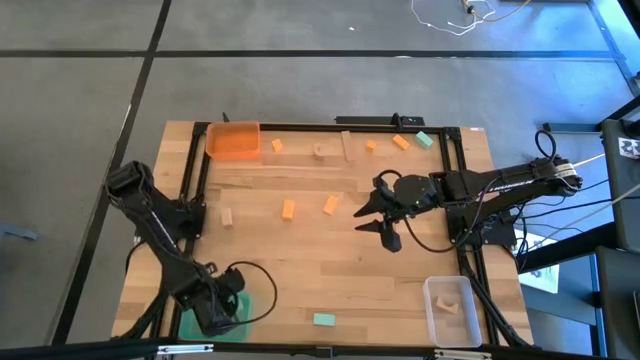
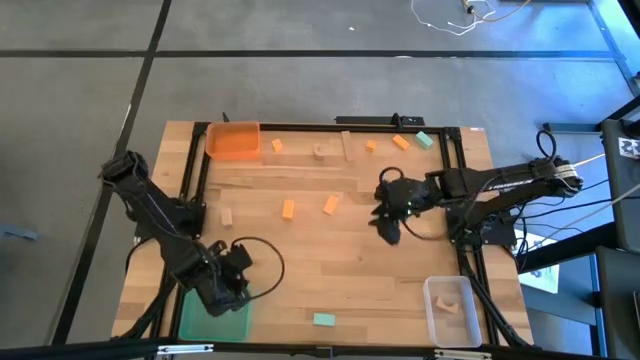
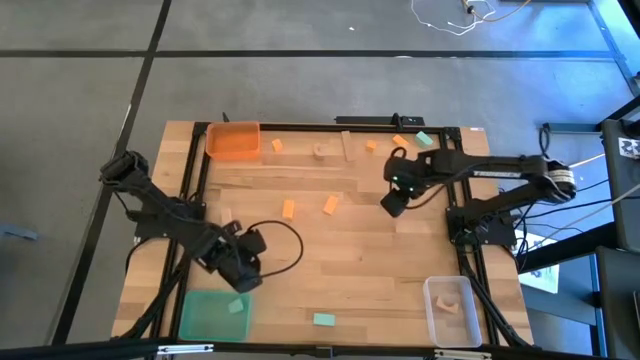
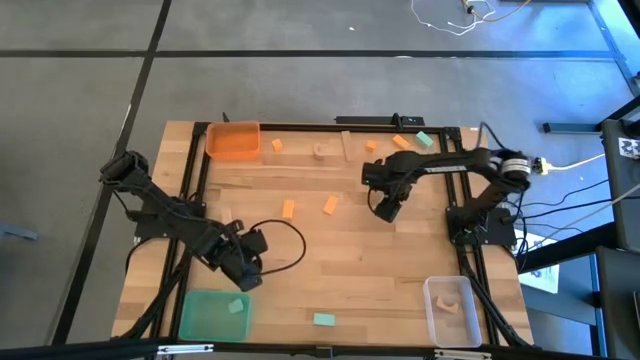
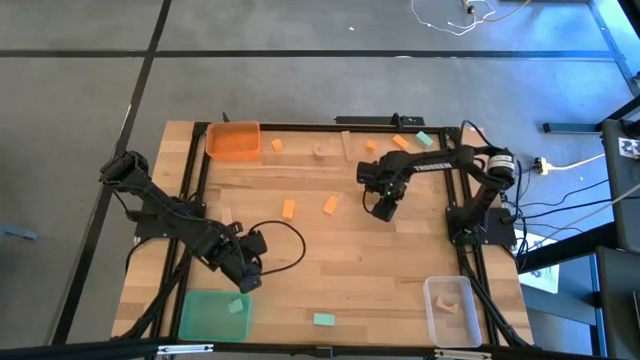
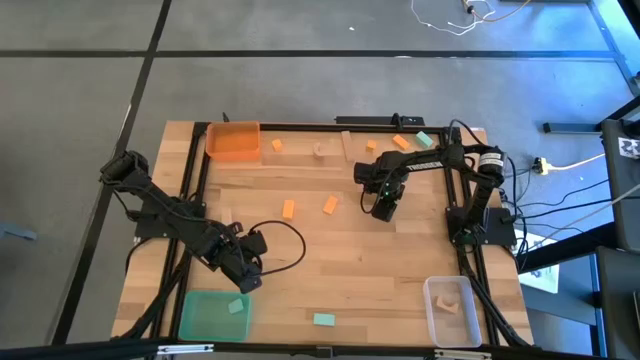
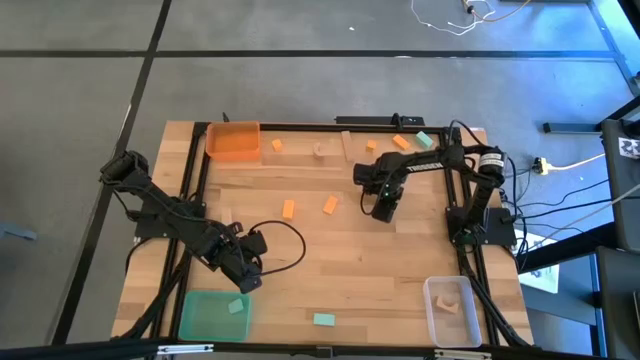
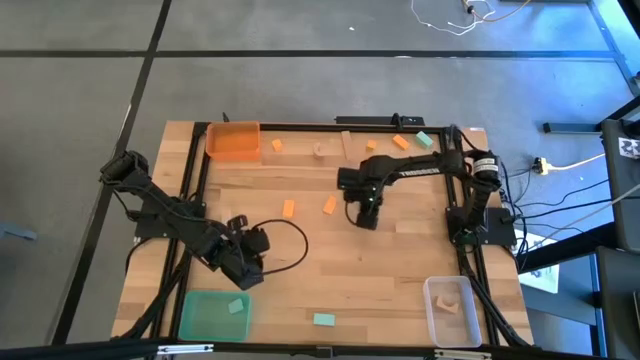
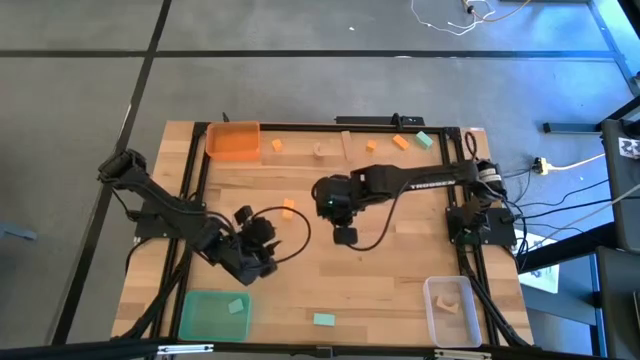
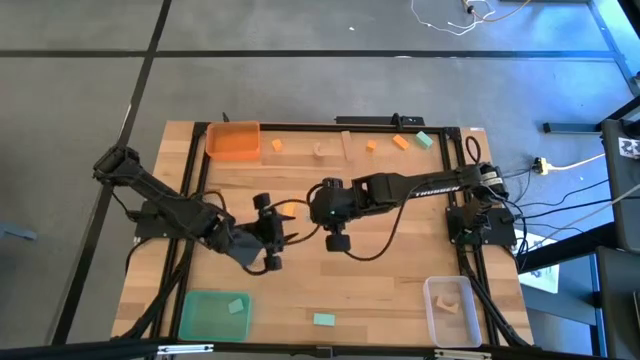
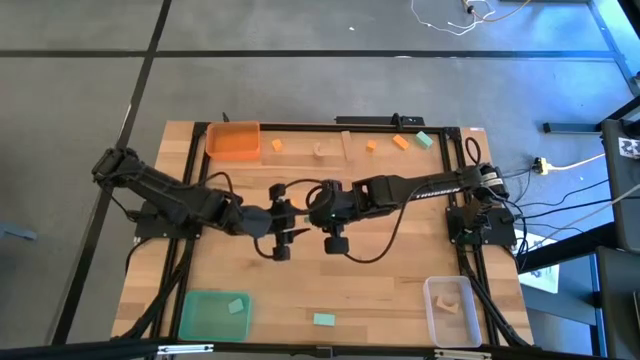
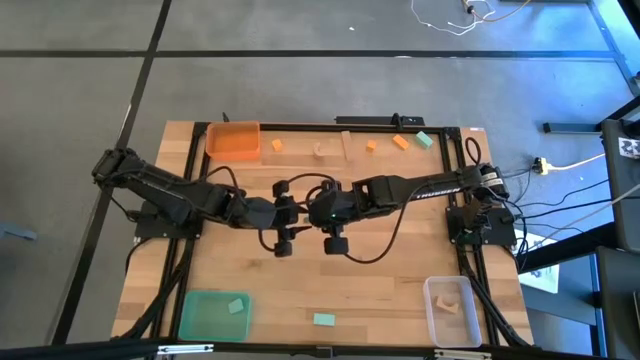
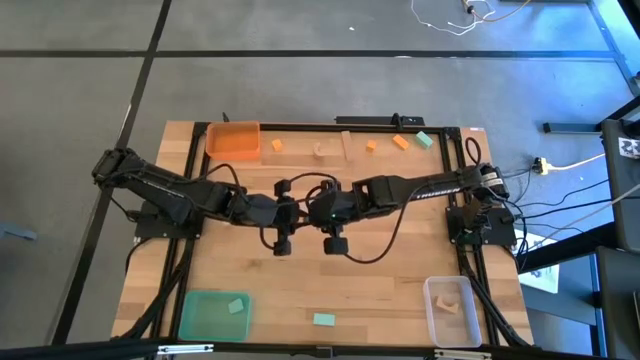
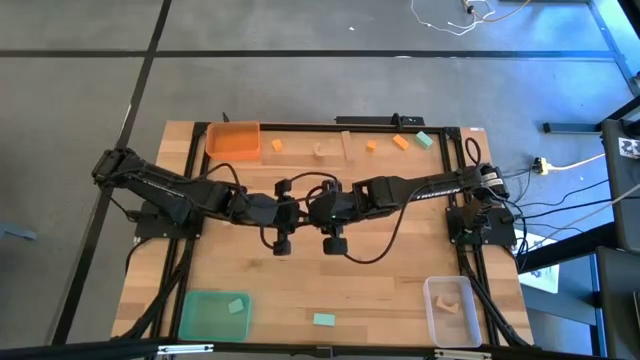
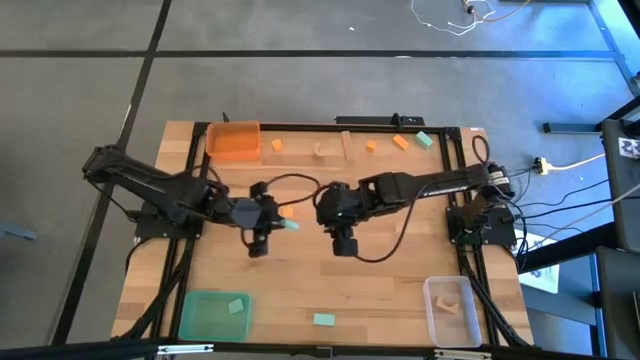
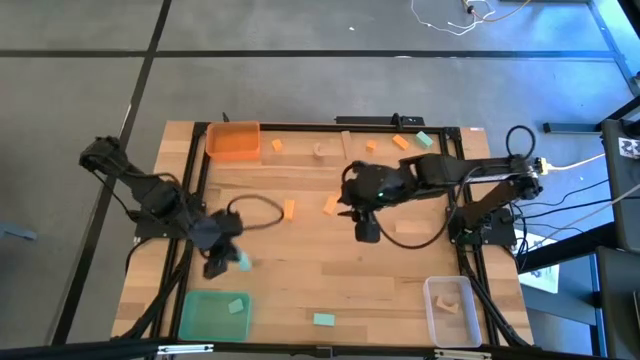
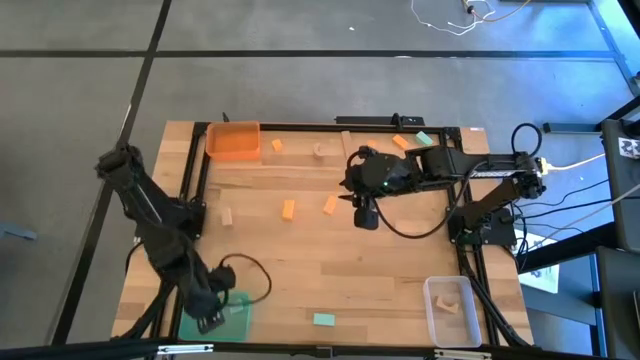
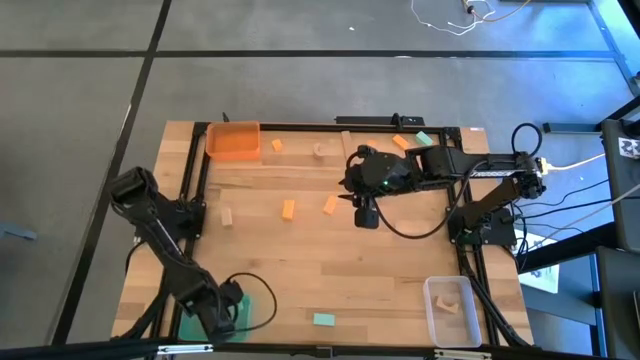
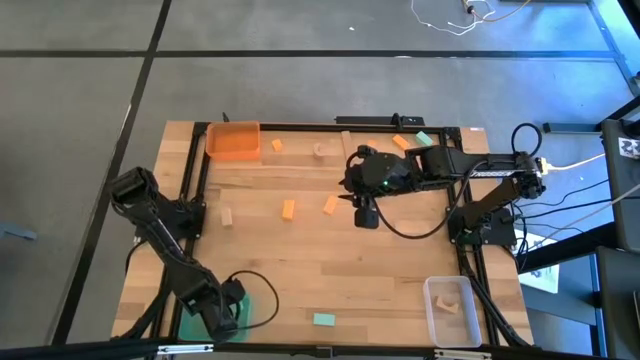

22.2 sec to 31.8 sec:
Task: Sort & place blocks by color
Put the blue block into the blue bin

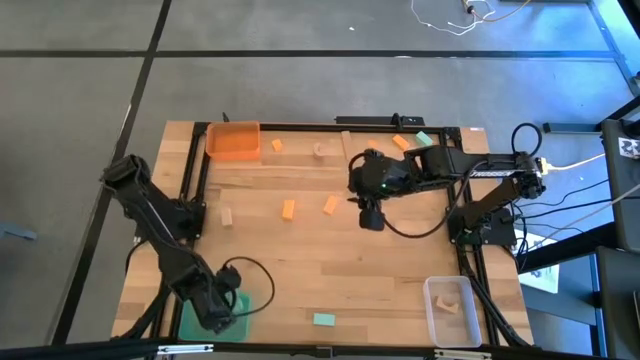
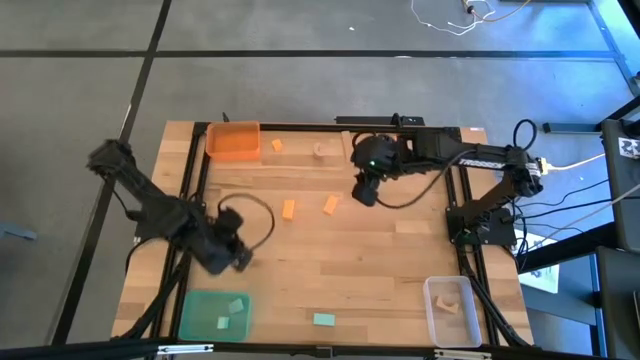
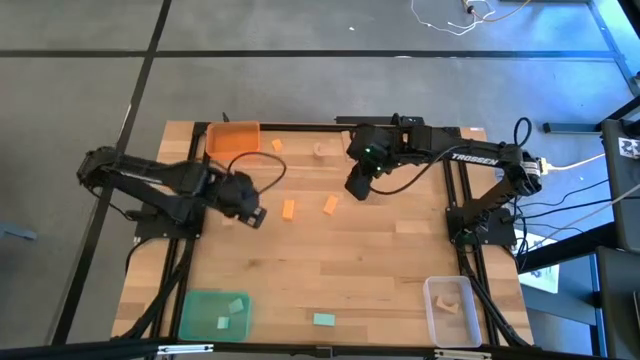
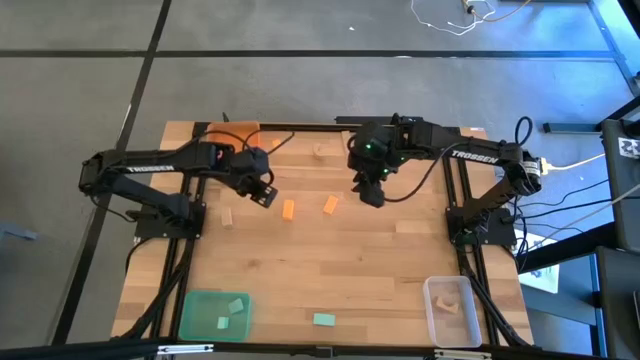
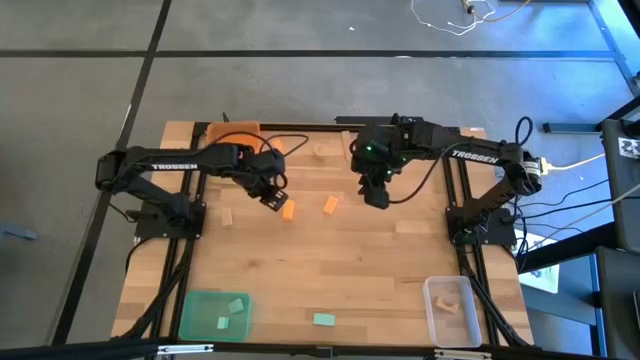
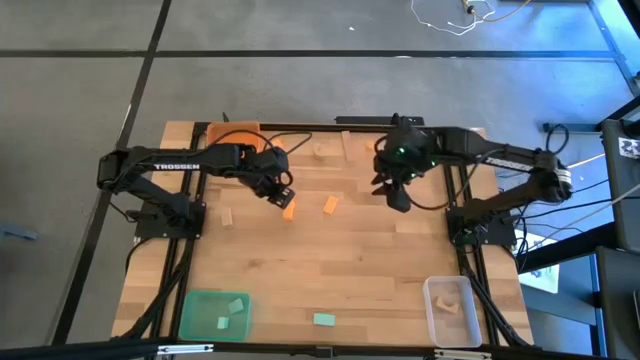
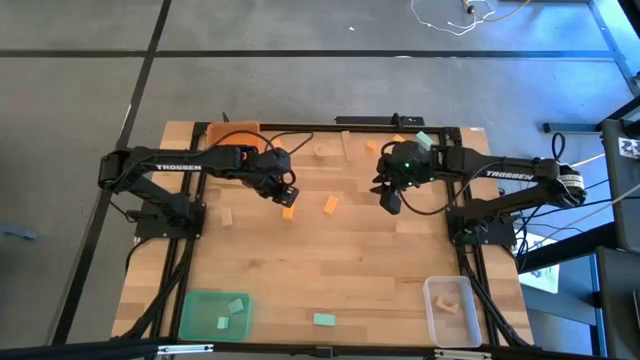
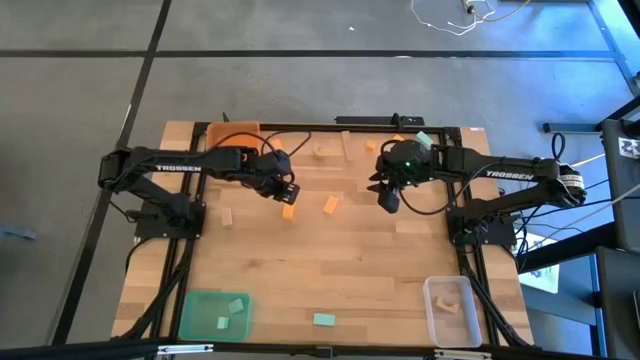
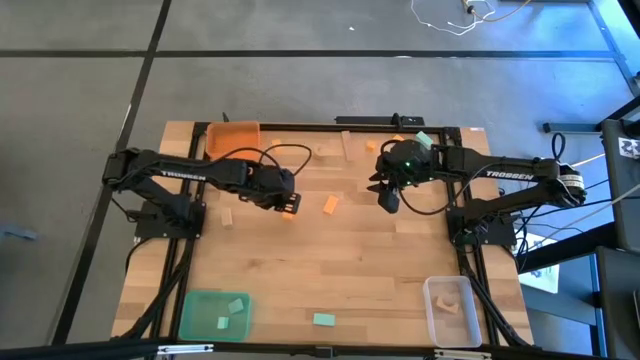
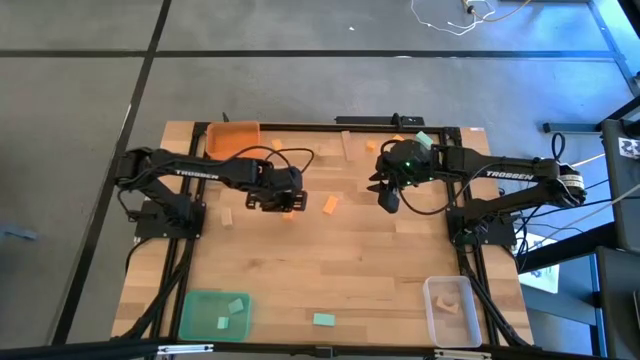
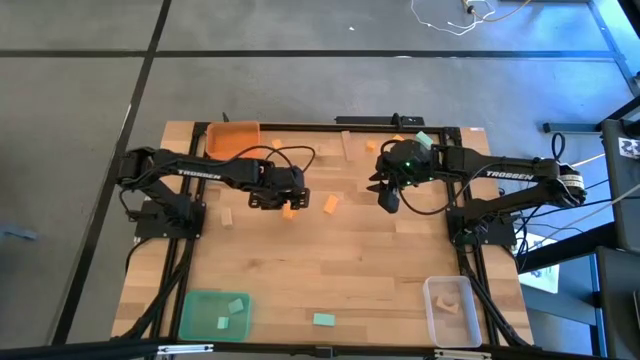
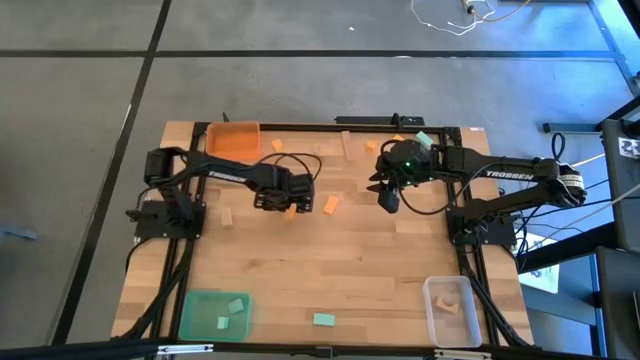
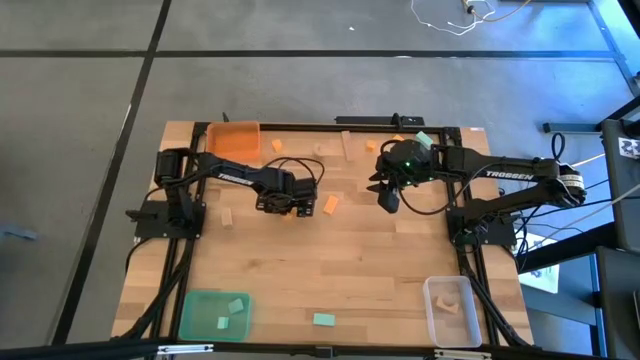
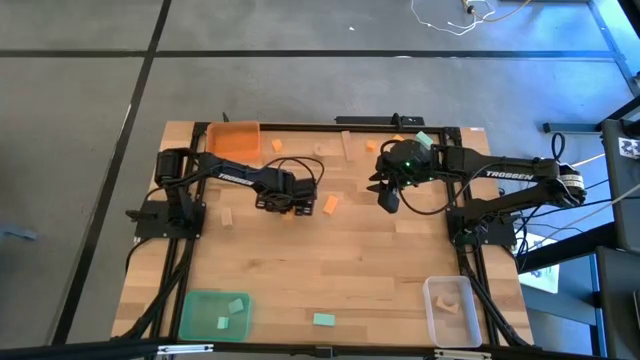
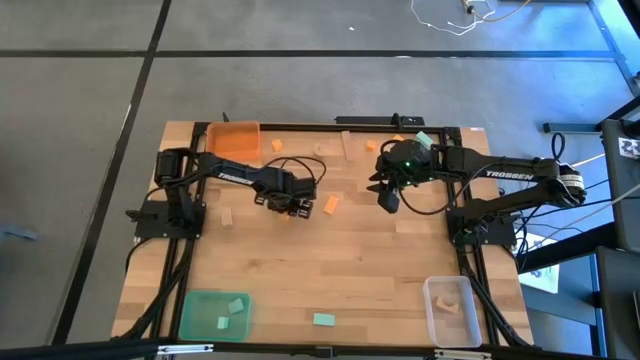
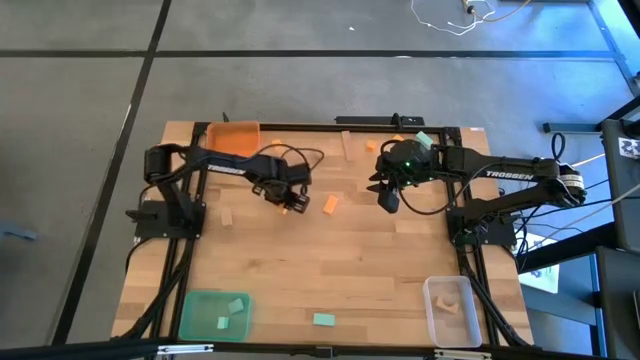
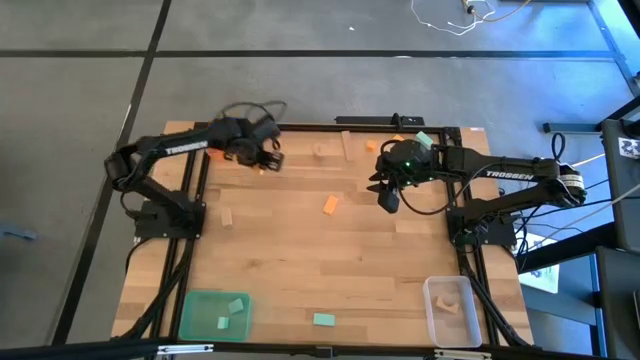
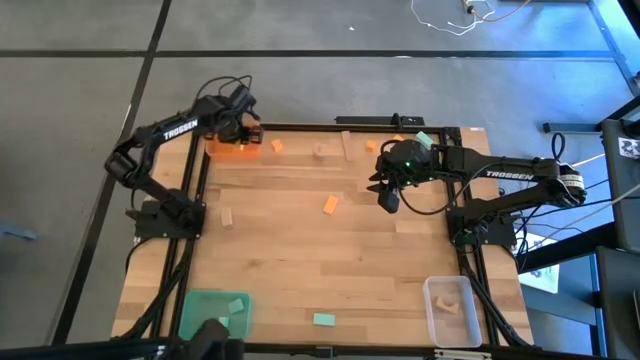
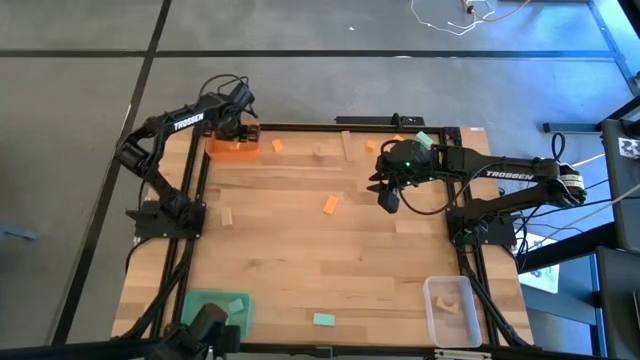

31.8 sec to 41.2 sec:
Put the orange block into the orange bin

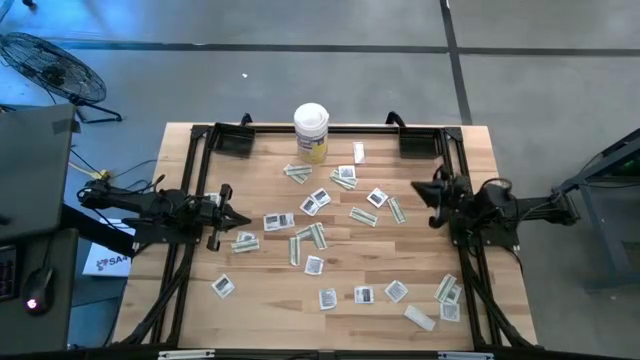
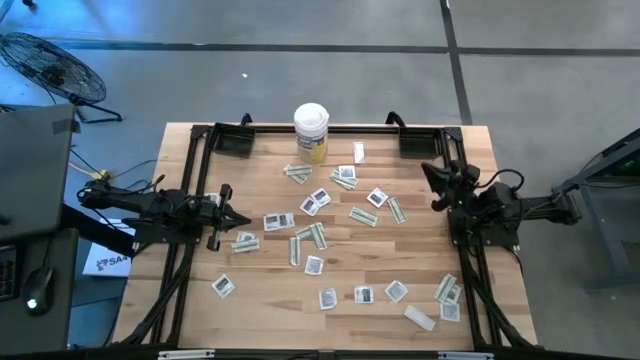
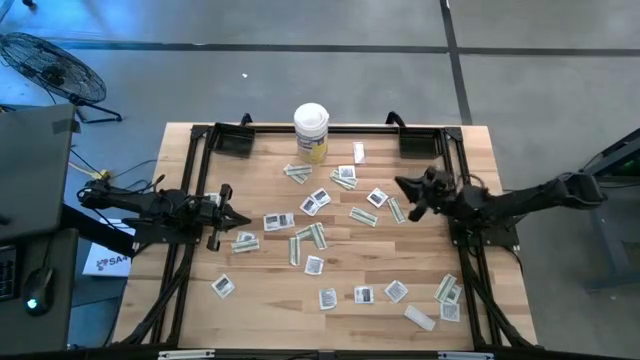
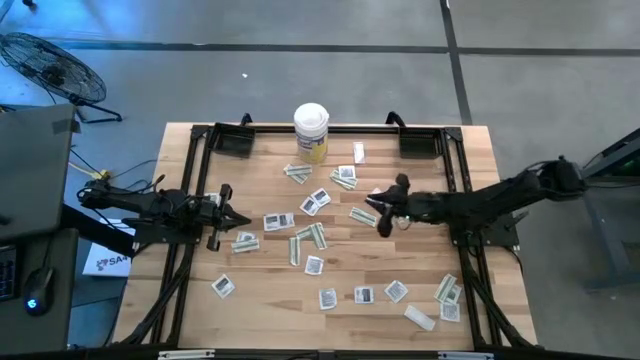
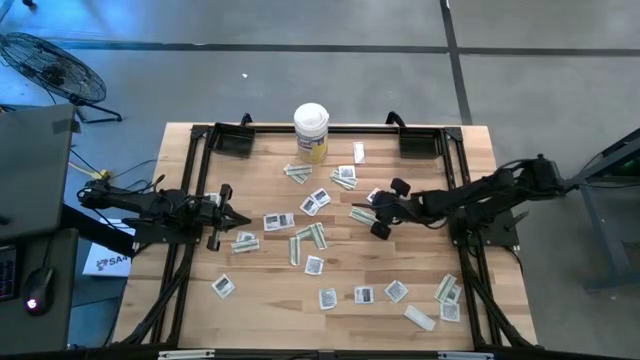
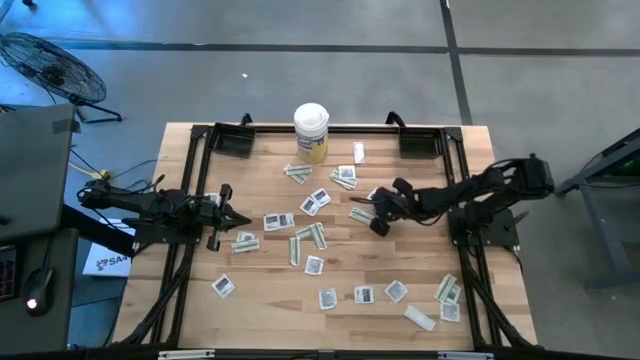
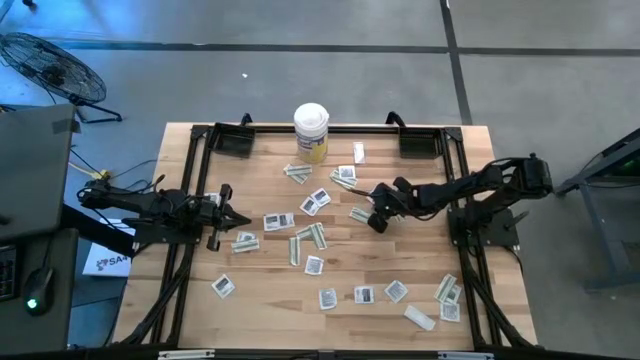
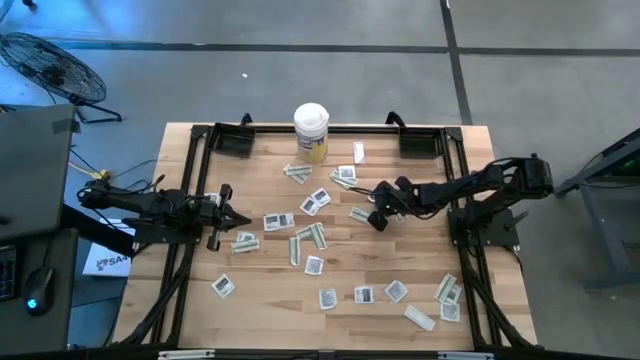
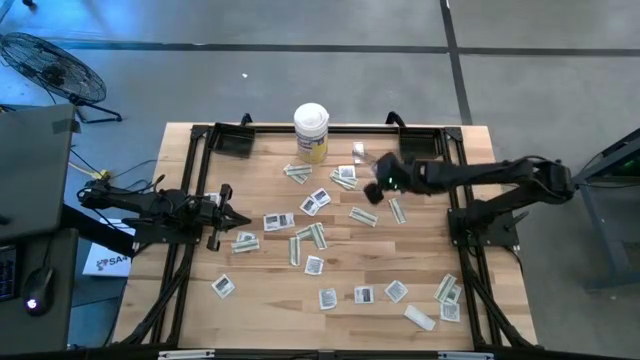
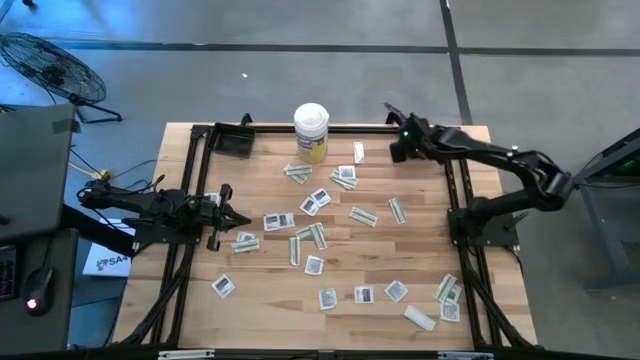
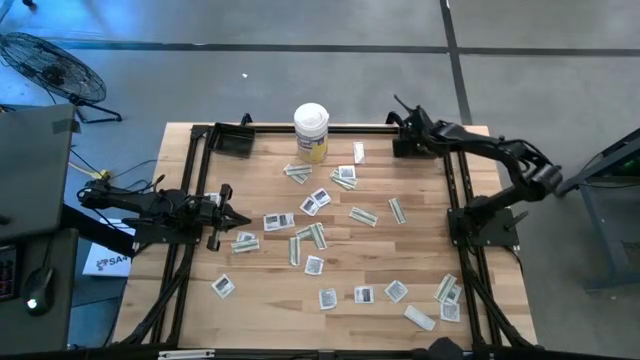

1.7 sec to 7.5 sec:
Task: Pick & Place First Aid Supplies
Put the black towelette pack into the right black basket
